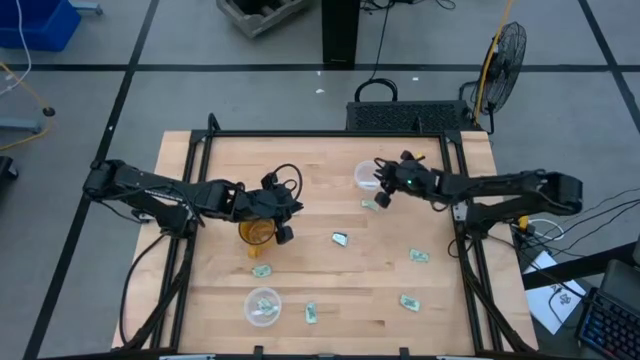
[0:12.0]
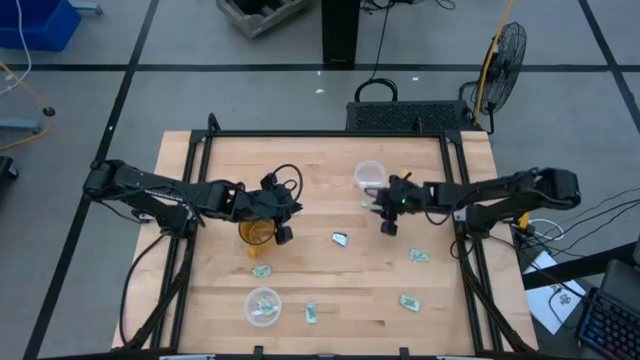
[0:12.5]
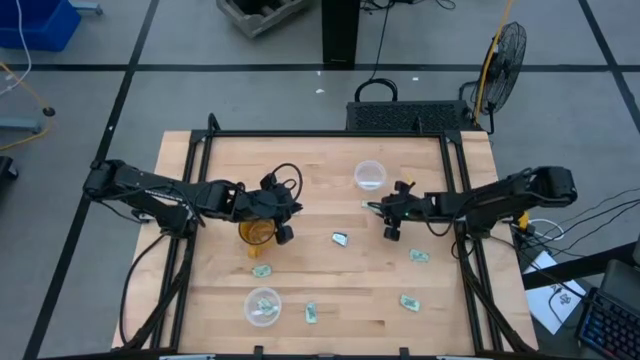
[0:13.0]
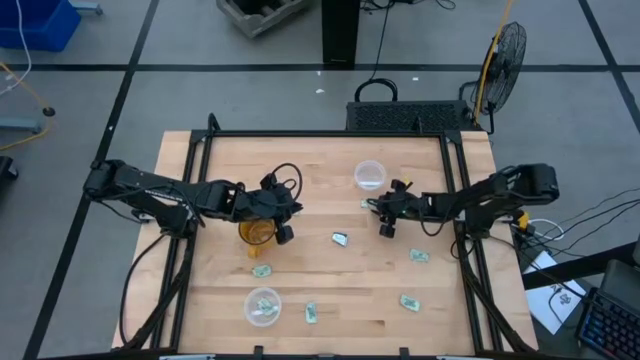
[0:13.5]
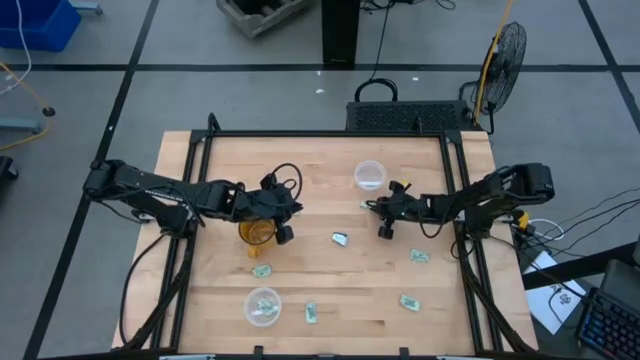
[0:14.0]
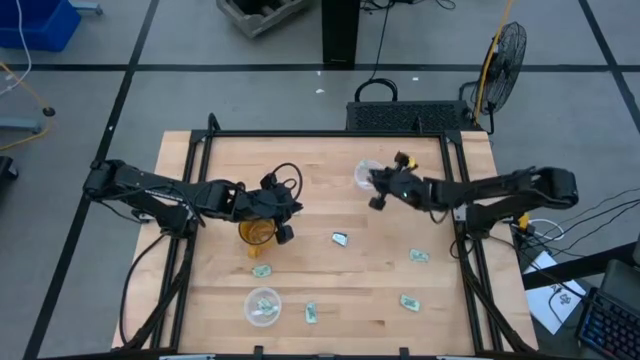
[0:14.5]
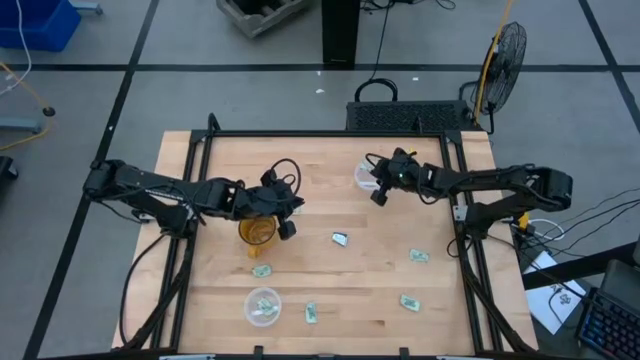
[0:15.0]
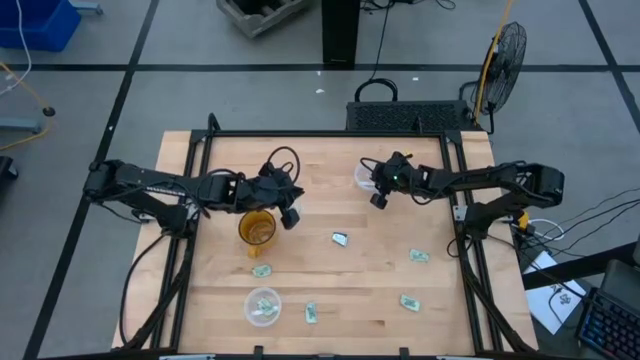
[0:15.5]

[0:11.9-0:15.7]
Task: Pick and place items into bin
Put the green stevia packet into the top transparent bin

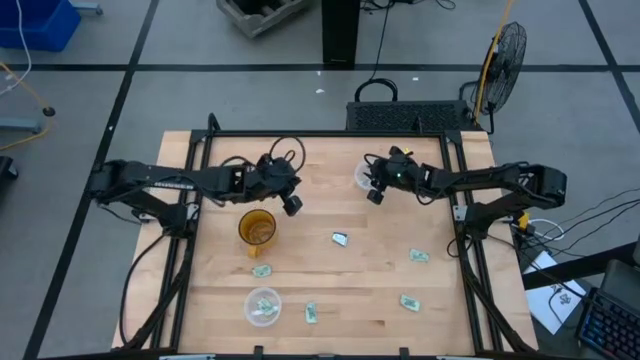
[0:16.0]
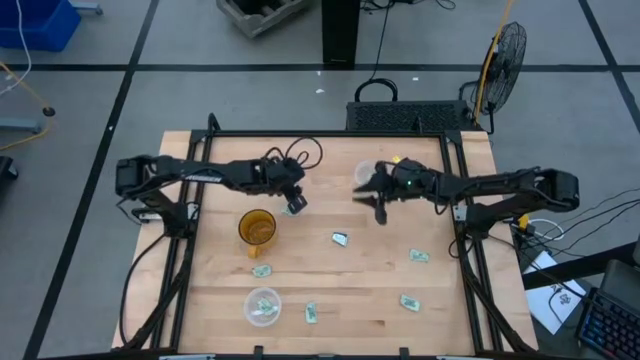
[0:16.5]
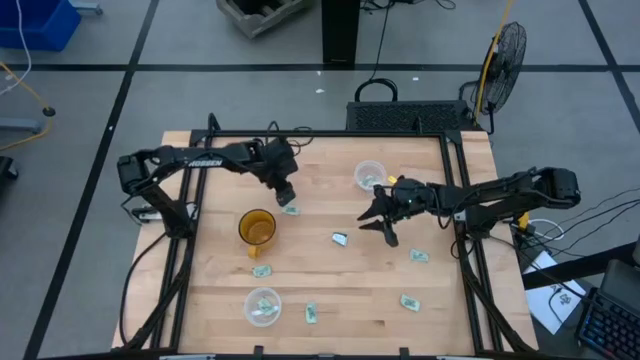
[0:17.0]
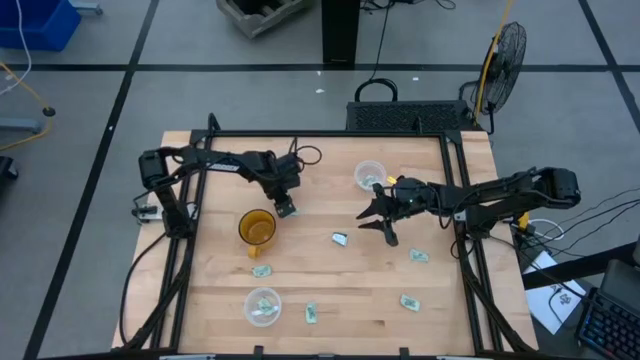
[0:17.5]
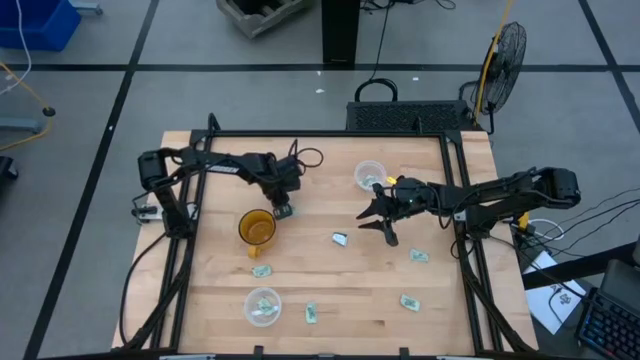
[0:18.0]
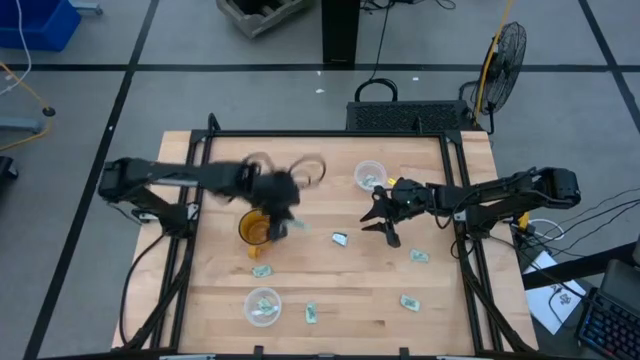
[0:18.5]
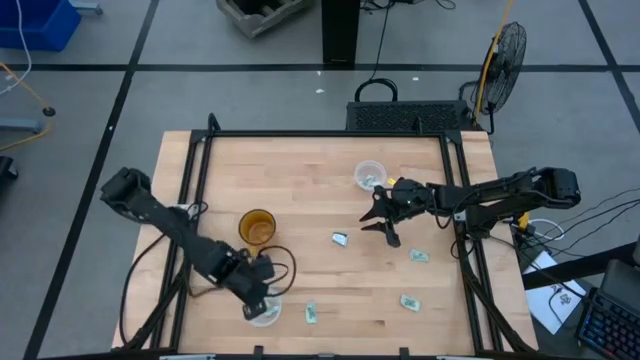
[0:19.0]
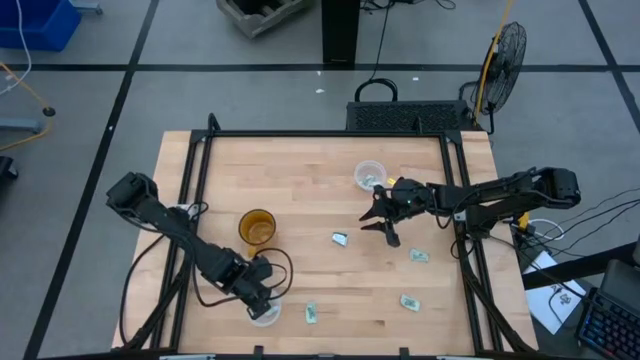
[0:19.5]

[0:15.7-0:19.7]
Put the green stevia packet into the bottom transparent bin

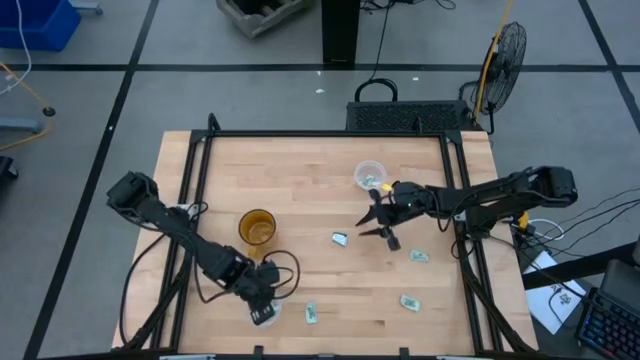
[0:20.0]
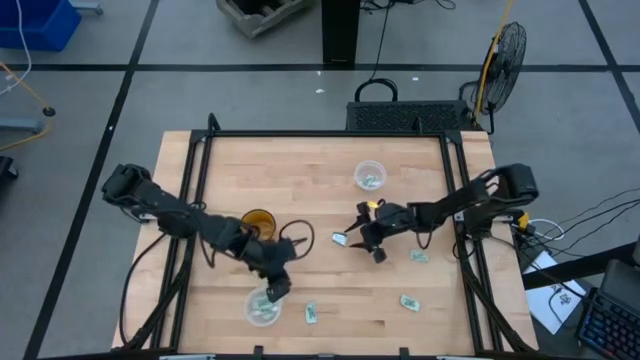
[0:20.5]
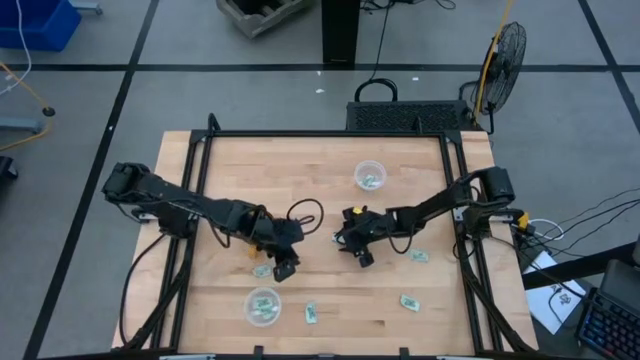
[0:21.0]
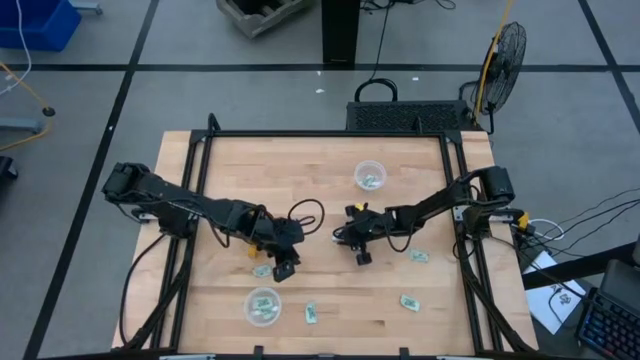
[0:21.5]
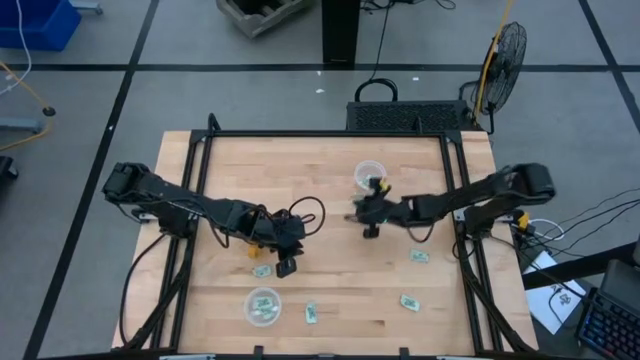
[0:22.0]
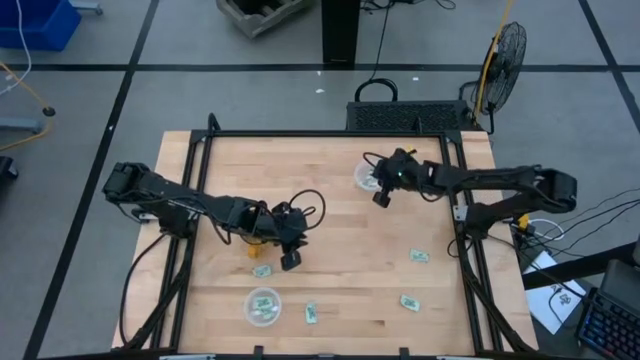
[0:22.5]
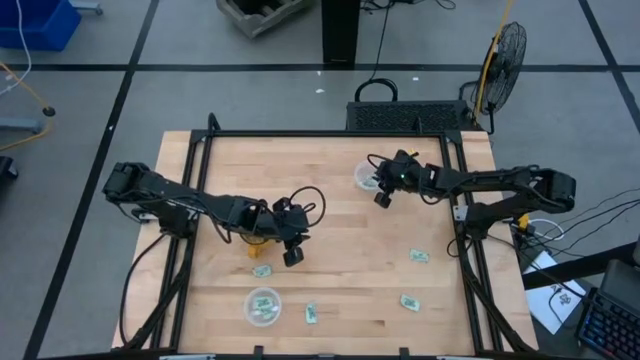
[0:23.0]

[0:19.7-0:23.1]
Put the dark green stevia packet into the top transparent bin

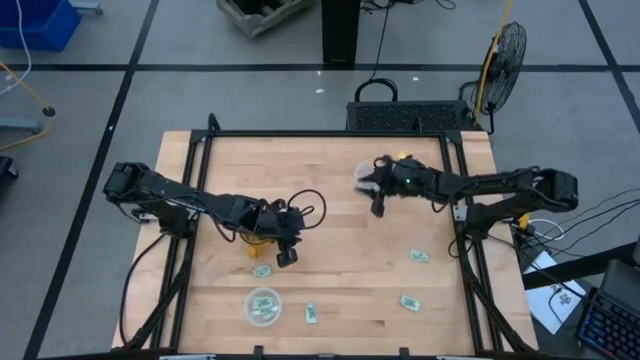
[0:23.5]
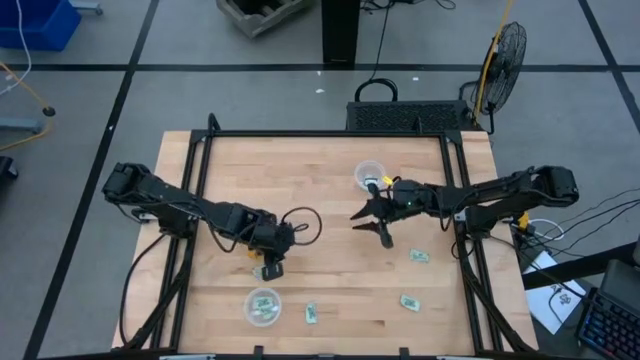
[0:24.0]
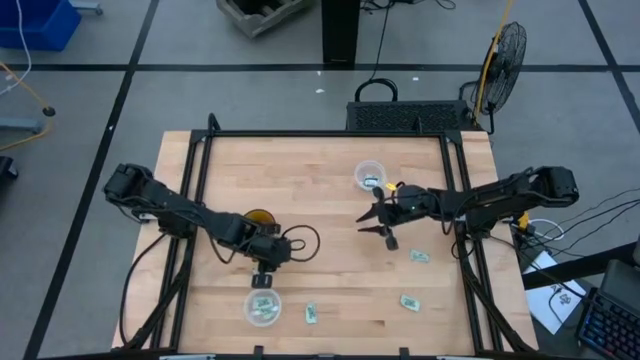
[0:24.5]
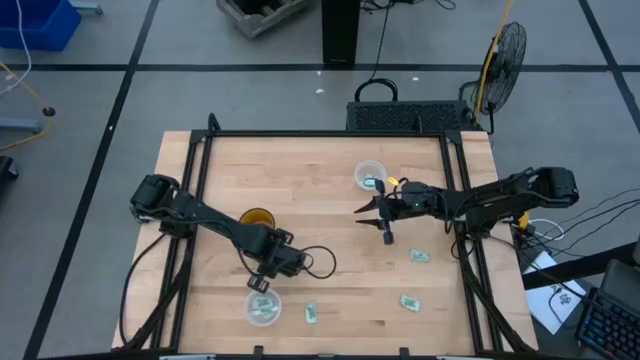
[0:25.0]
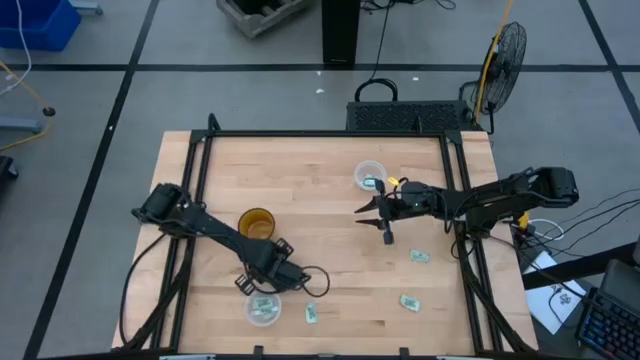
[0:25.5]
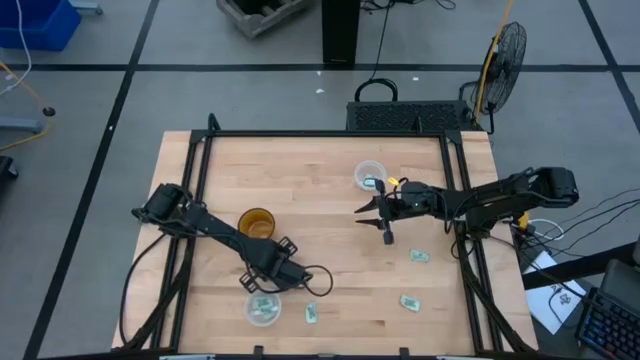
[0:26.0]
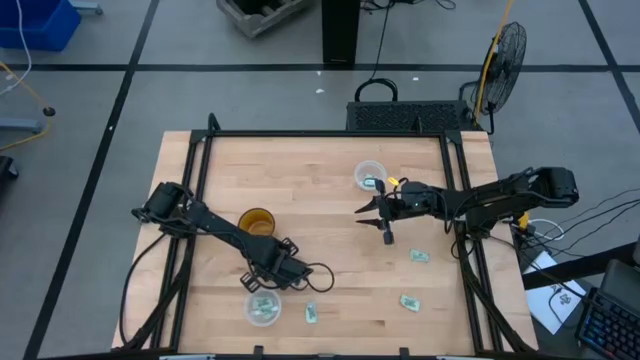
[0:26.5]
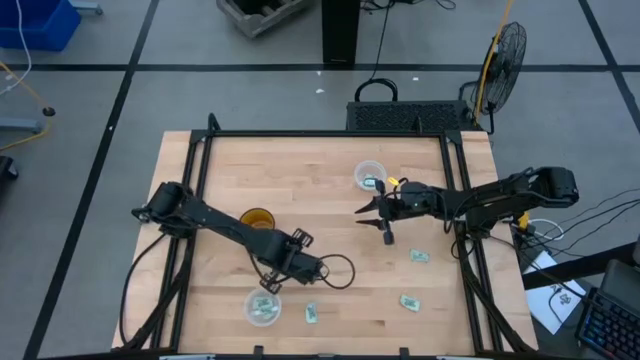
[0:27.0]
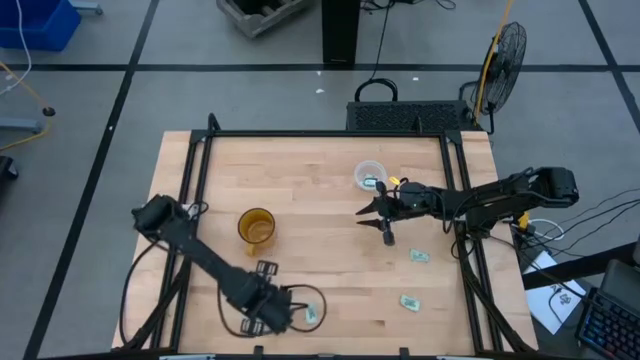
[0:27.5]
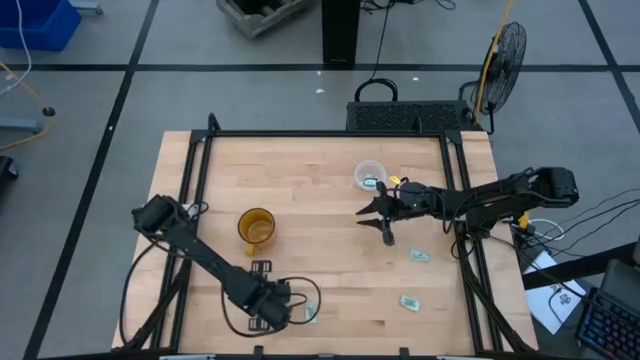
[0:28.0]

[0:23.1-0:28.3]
Put the green stevia packet into the bottom transparent bin

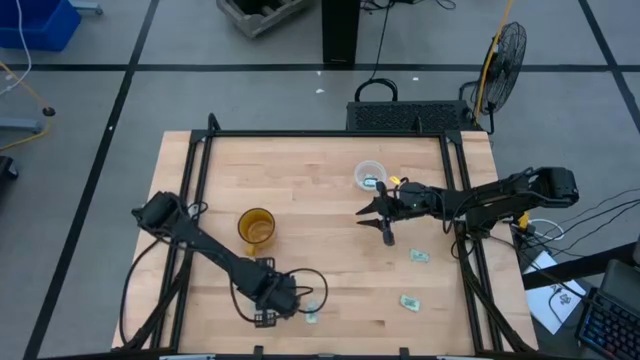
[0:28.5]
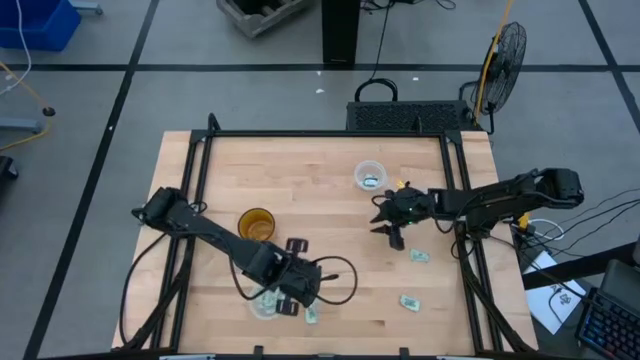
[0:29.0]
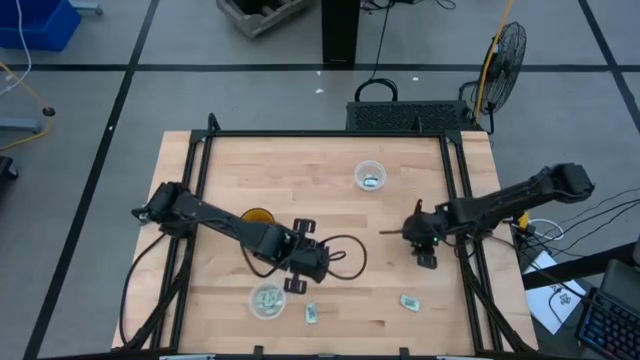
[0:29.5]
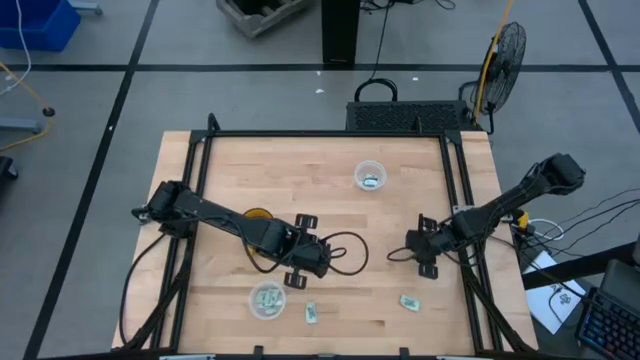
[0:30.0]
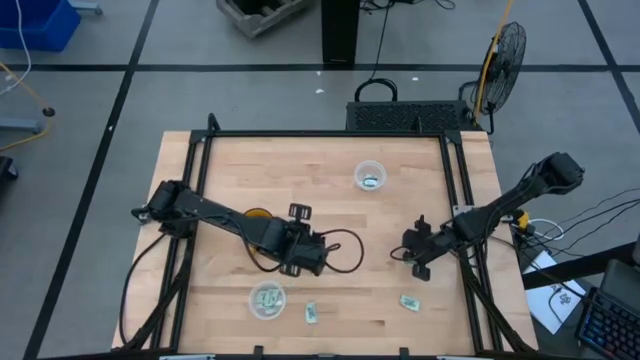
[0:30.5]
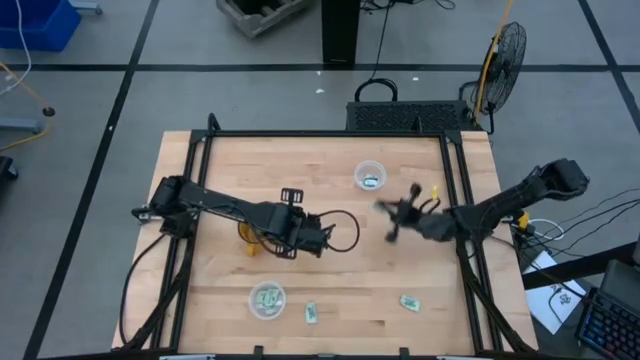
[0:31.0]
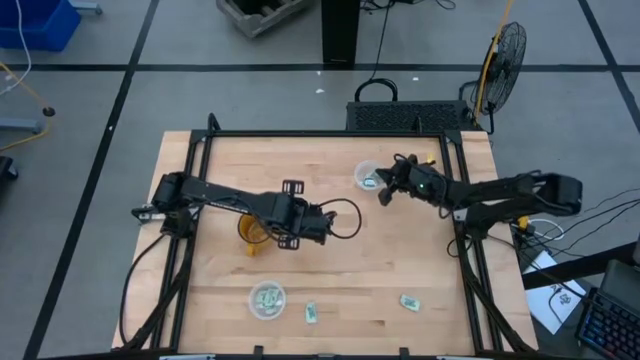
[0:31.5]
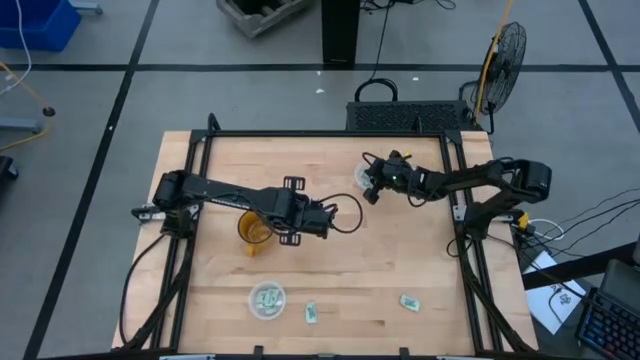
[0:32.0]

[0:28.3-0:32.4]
Put the green stevia packet into the top transparent bin

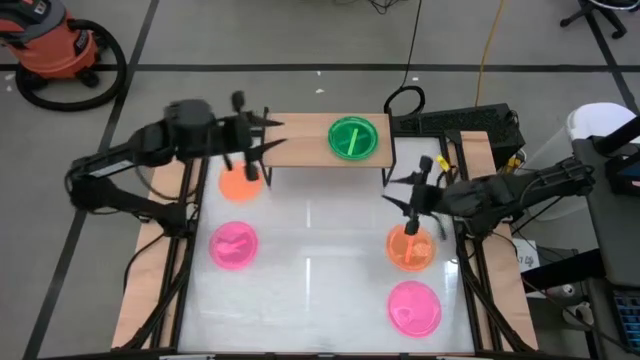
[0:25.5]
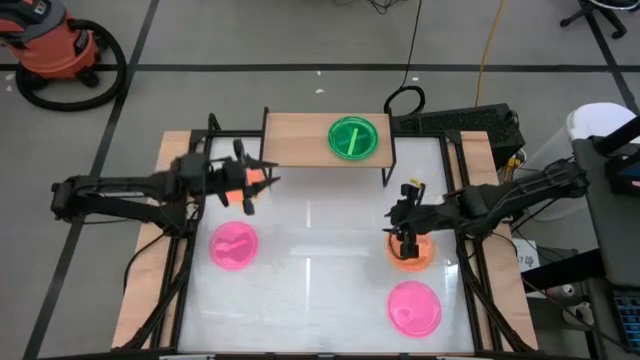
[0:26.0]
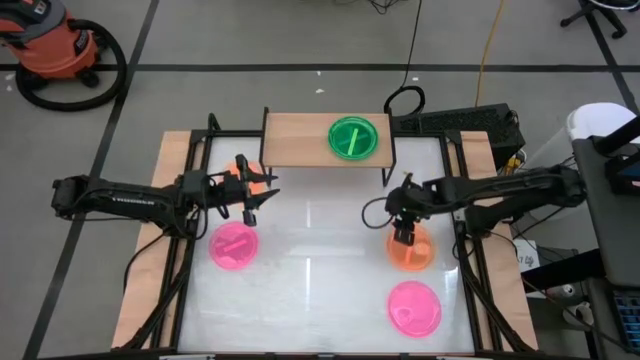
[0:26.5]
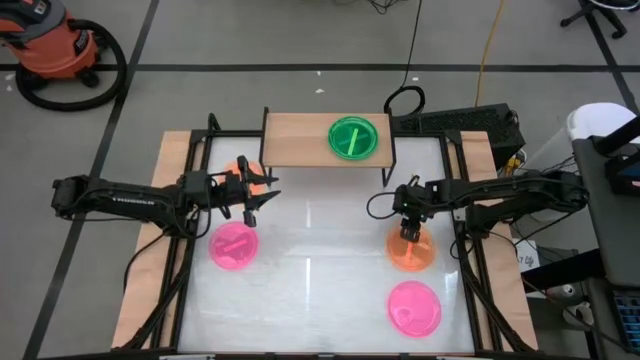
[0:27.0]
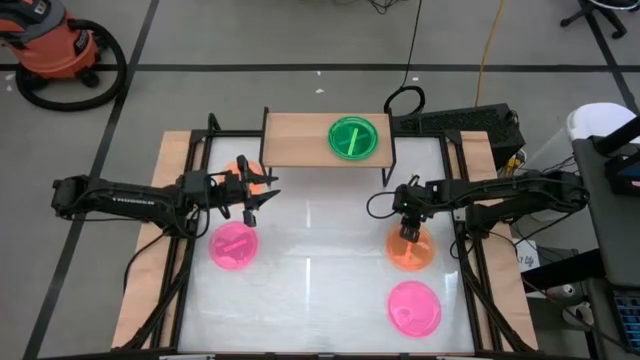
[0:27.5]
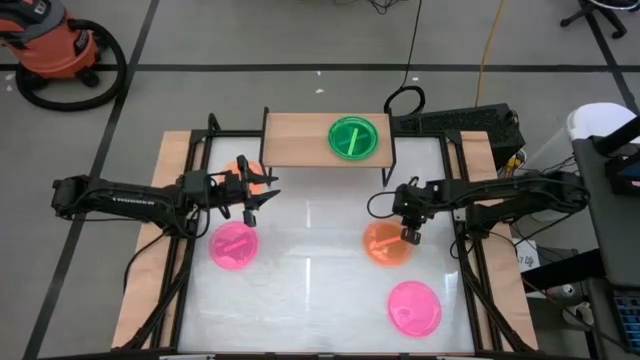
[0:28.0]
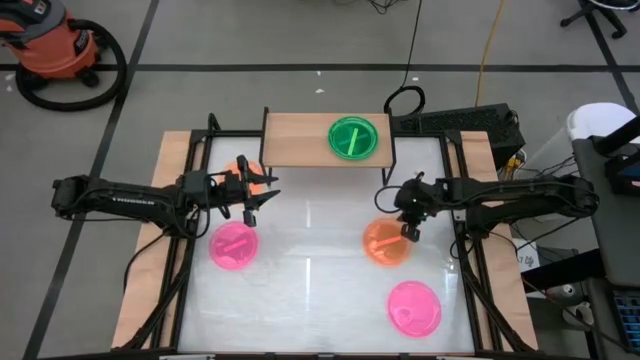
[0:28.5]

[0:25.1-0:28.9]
Task: Place and stack plates onto a shelf
Put the right orange transparent plate on the shelf
